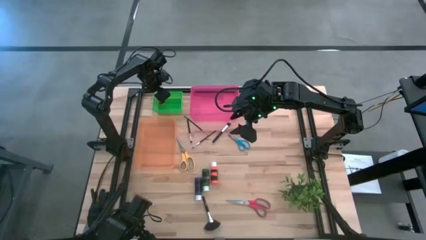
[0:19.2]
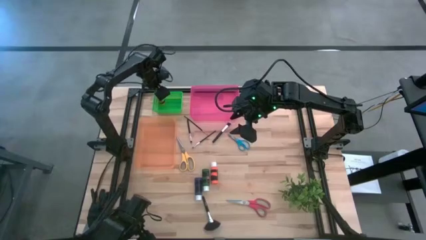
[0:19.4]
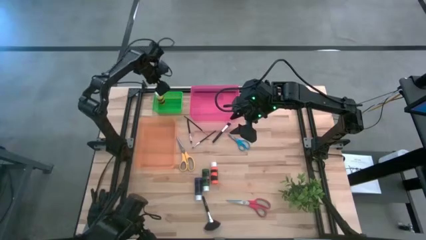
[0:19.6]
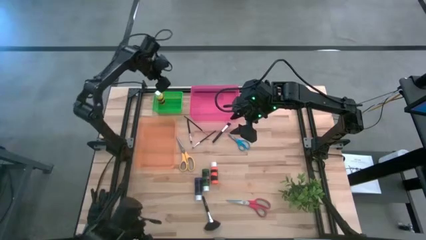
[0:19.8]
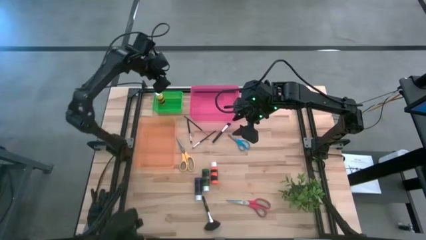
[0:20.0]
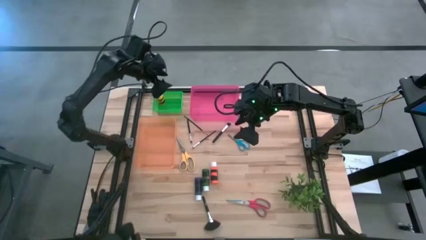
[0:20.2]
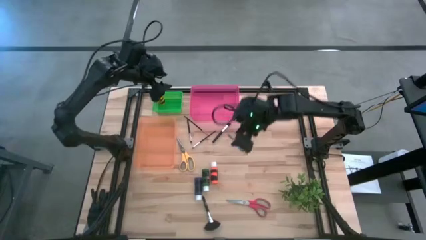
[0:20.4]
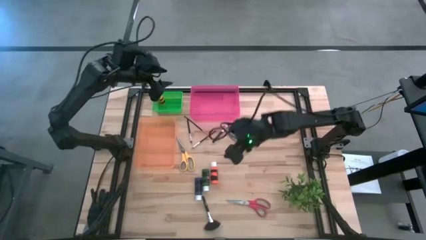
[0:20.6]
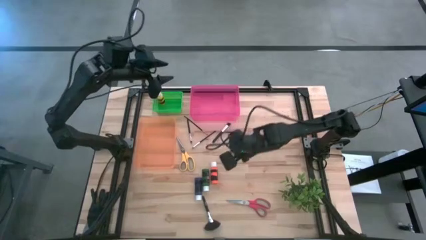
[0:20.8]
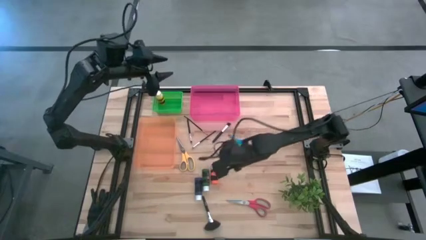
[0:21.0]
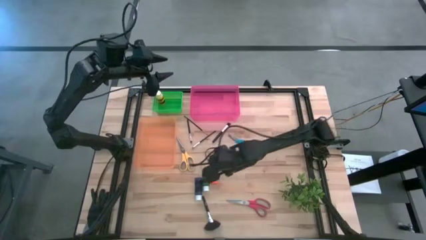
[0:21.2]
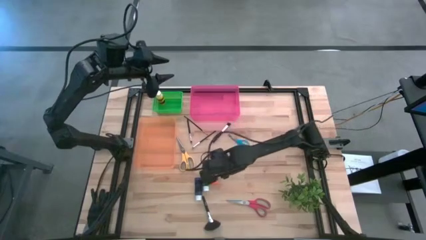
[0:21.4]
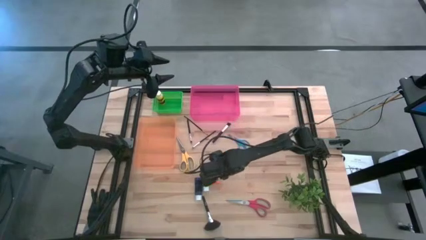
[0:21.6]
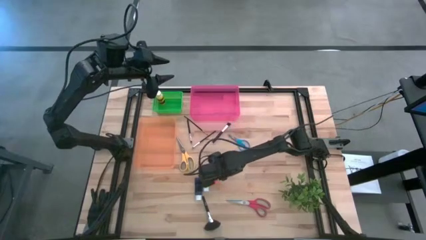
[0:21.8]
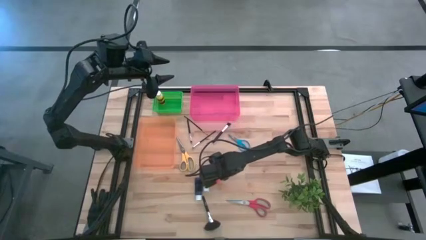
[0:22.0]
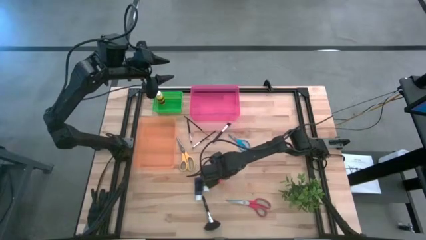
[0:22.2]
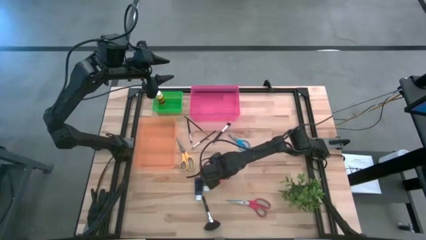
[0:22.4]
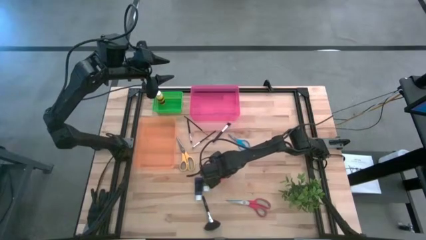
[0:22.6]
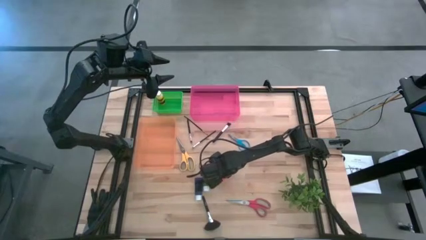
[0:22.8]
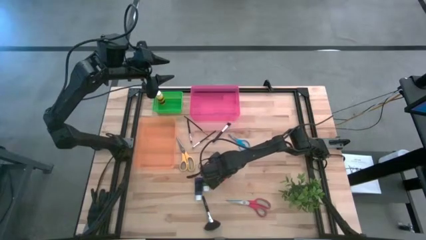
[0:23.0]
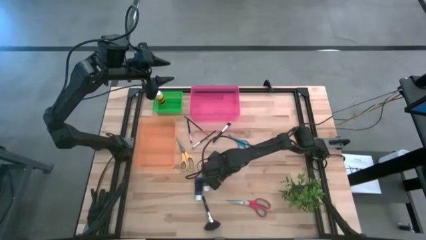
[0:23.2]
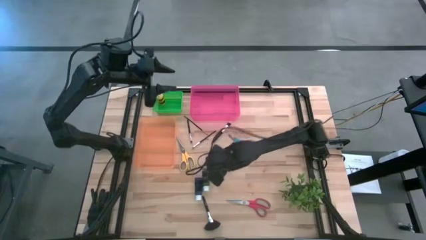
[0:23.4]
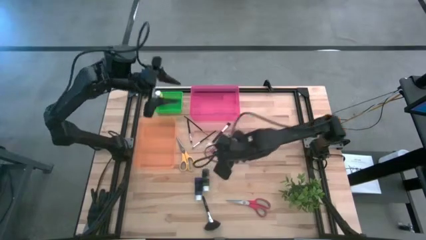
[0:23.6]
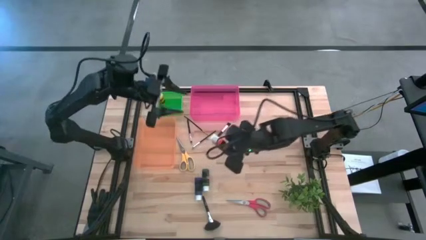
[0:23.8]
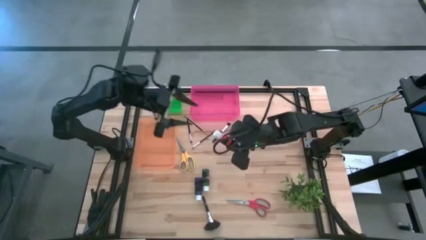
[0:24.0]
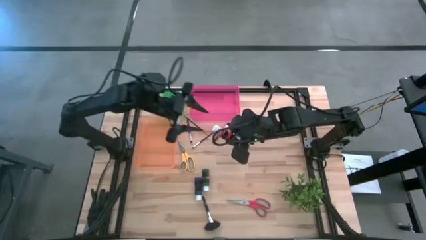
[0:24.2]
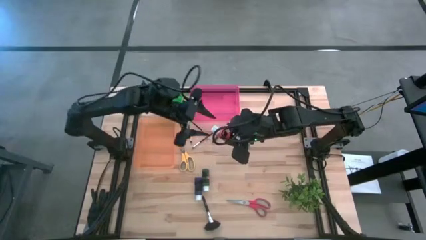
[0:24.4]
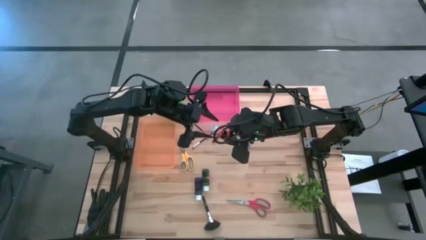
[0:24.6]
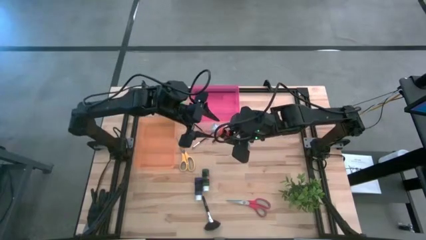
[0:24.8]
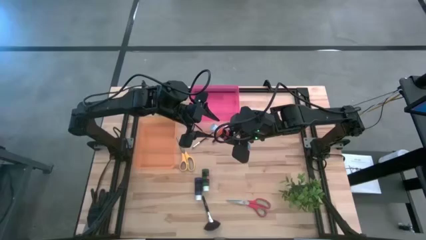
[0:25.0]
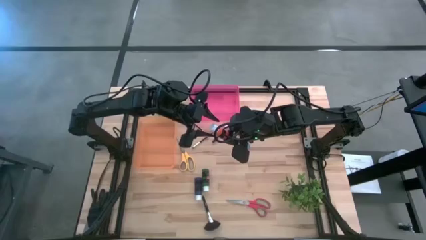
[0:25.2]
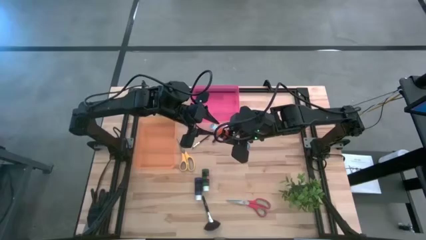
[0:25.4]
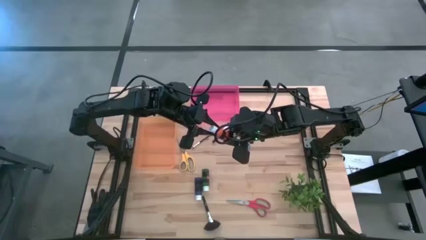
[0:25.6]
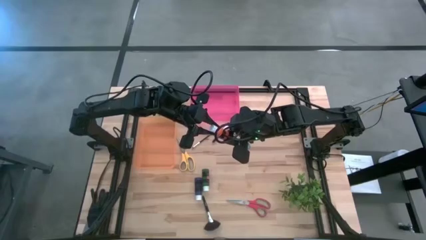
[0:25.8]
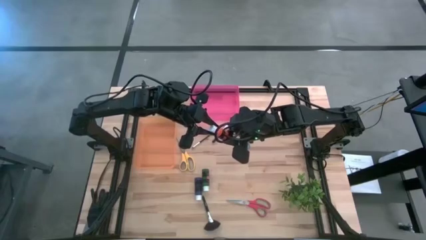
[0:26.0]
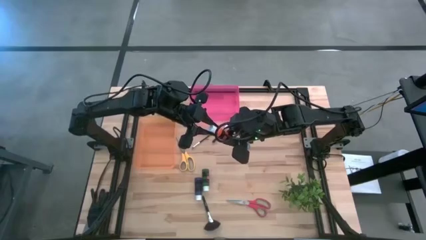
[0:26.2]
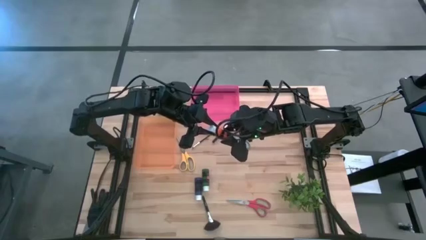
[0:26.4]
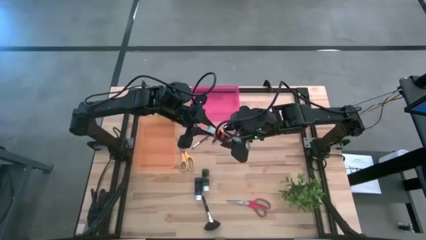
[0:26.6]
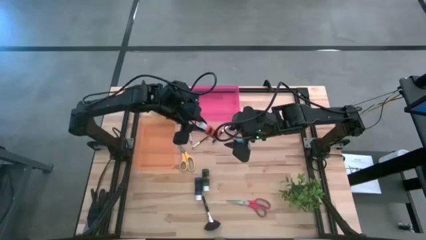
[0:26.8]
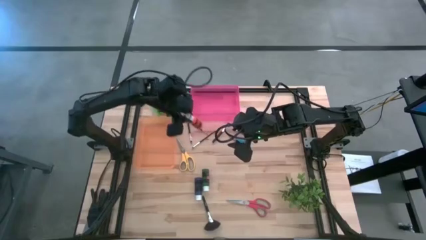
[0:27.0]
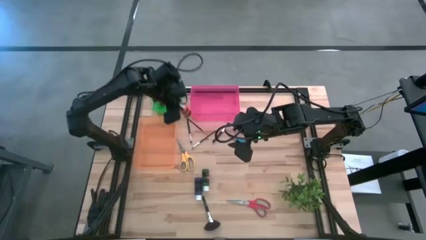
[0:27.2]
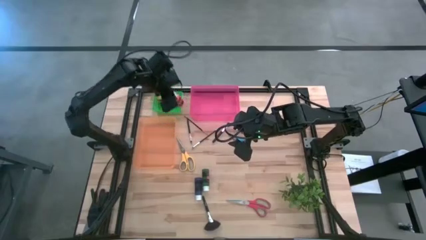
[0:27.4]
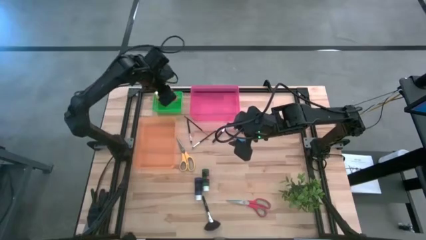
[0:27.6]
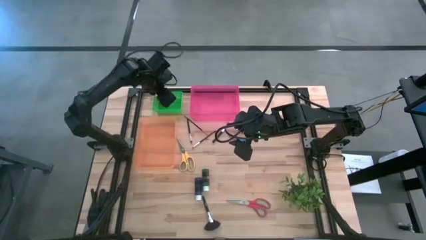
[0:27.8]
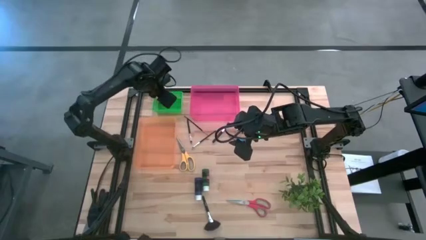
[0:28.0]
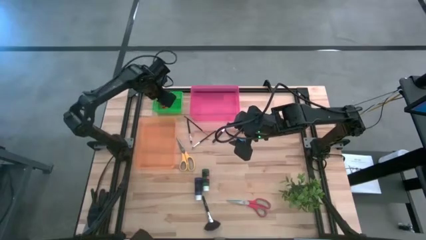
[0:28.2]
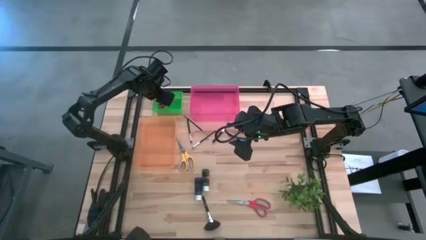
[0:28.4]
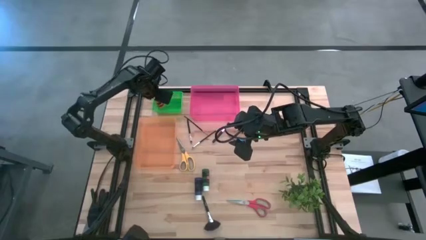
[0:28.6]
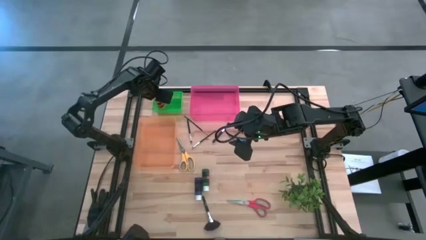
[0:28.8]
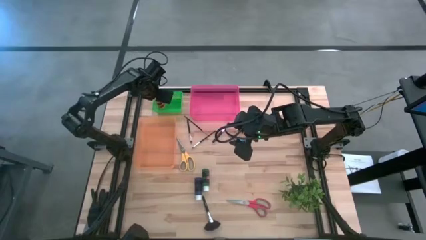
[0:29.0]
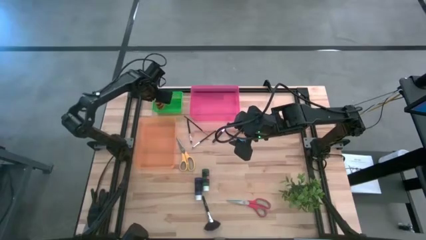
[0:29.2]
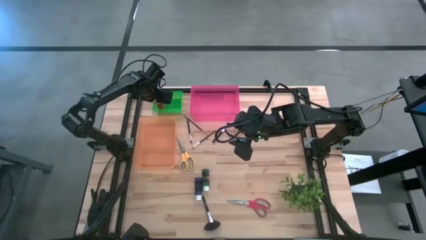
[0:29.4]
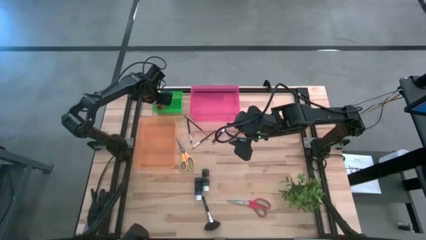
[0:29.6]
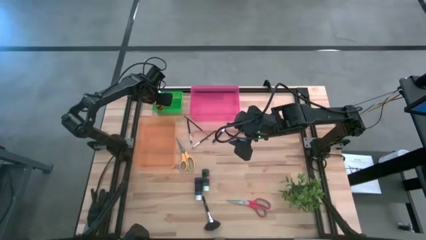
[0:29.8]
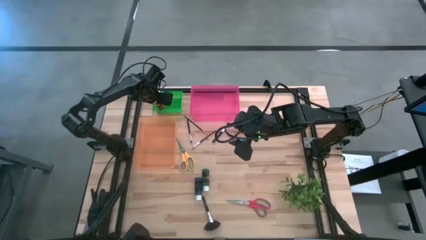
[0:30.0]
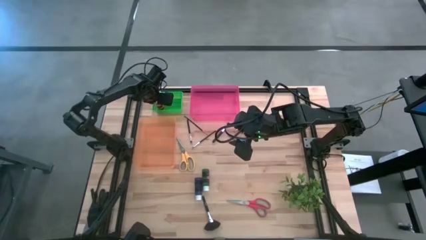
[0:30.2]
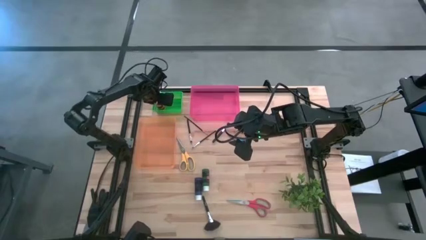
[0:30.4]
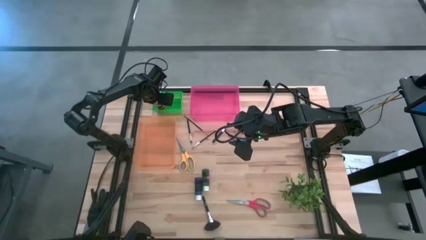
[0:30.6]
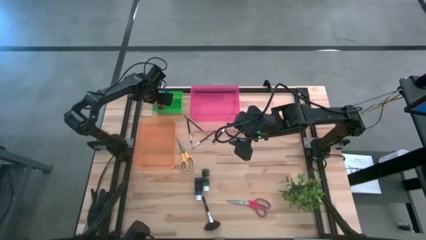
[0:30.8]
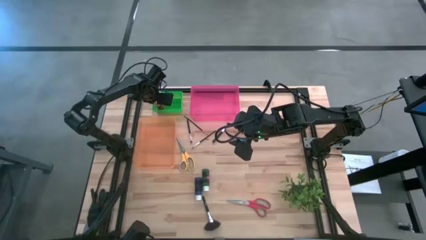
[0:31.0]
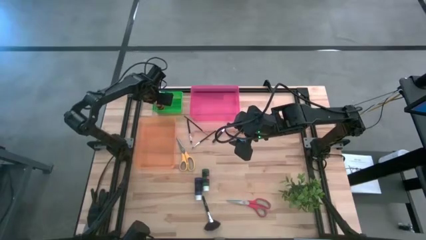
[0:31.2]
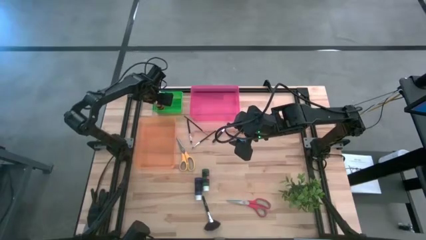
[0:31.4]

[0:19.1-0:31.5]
Task: Pick & Place Paint Supplies
Put the orange paint bottle into the green bin
